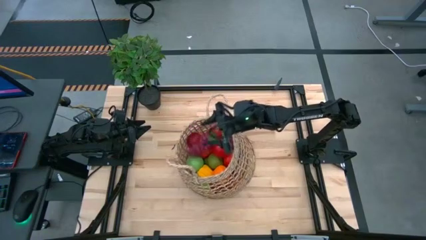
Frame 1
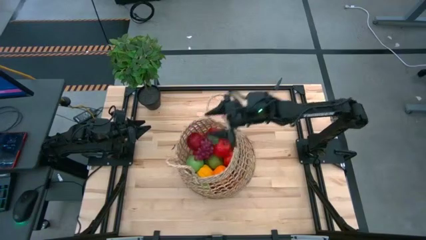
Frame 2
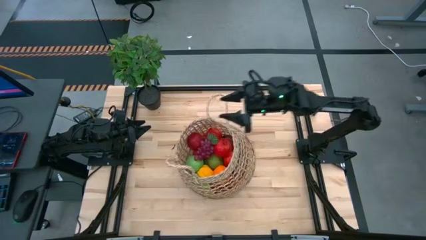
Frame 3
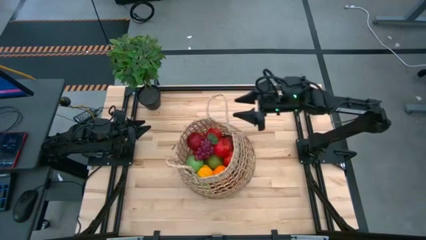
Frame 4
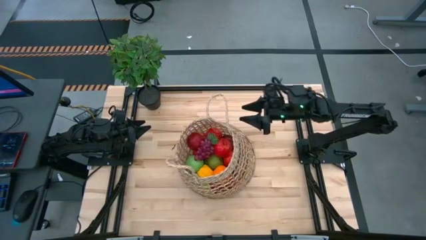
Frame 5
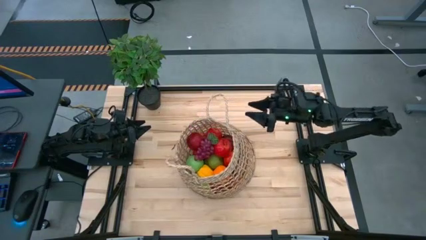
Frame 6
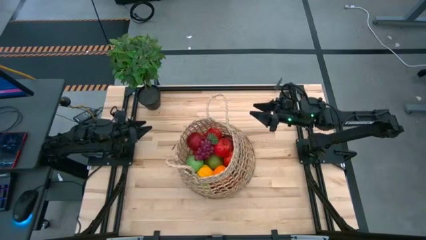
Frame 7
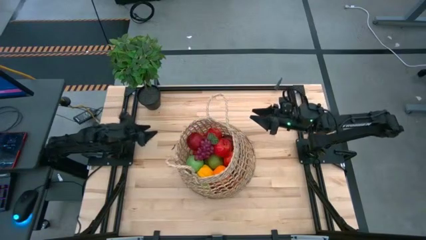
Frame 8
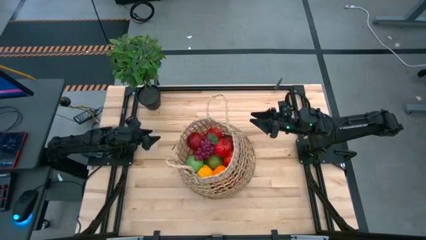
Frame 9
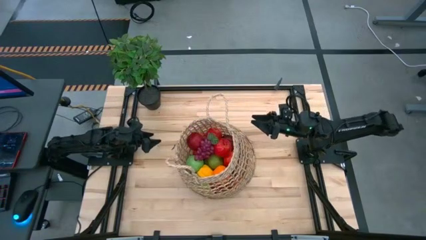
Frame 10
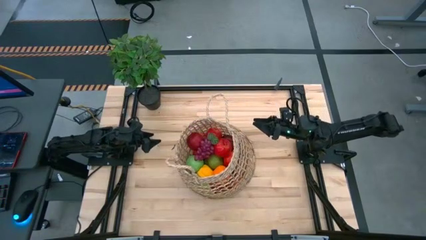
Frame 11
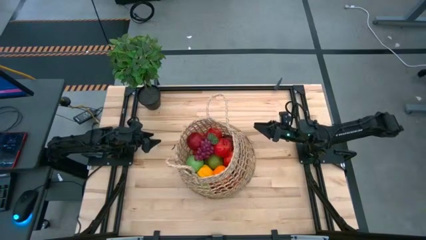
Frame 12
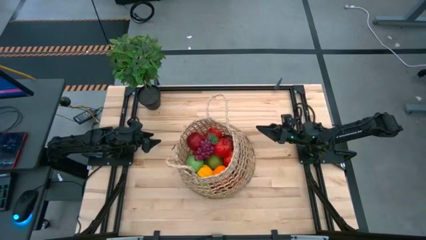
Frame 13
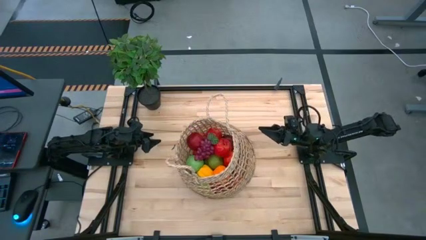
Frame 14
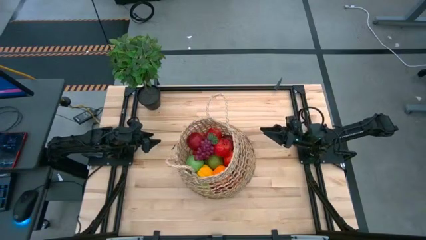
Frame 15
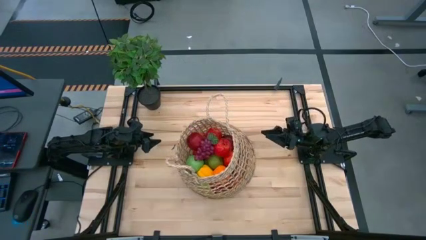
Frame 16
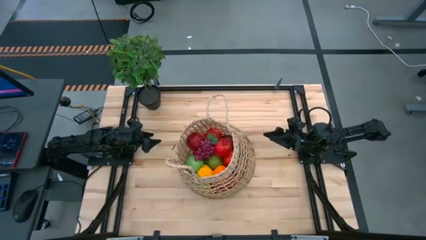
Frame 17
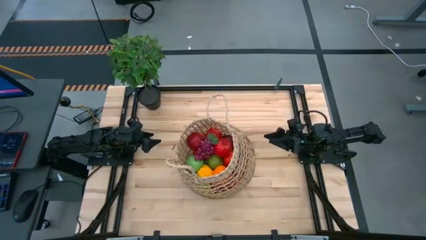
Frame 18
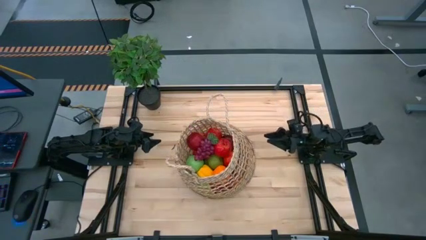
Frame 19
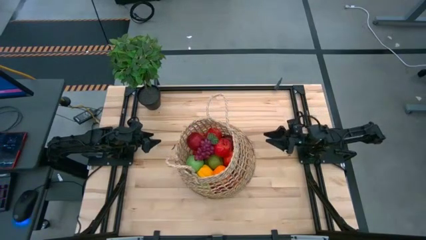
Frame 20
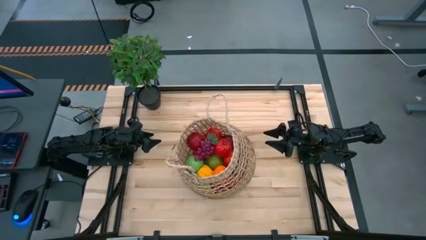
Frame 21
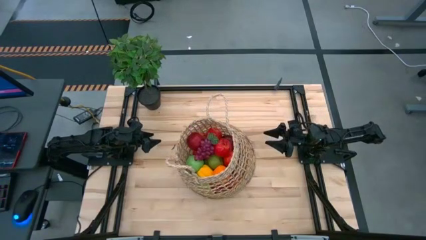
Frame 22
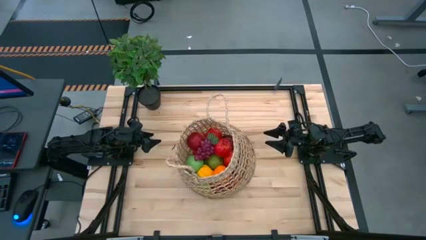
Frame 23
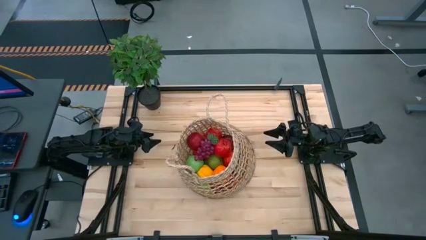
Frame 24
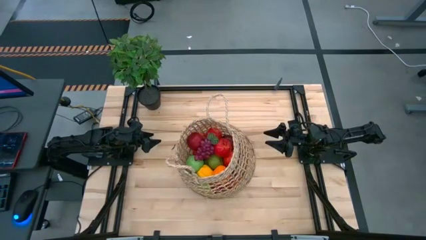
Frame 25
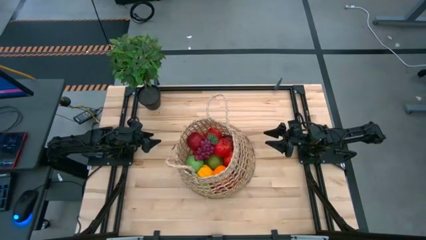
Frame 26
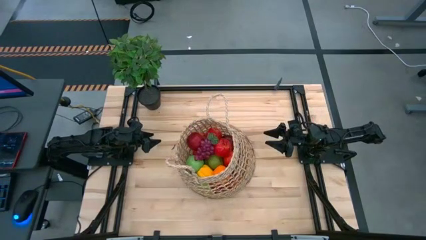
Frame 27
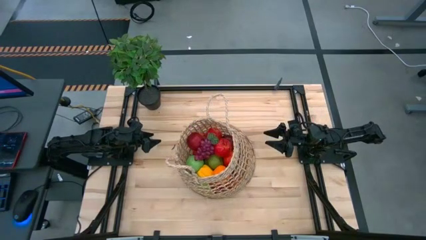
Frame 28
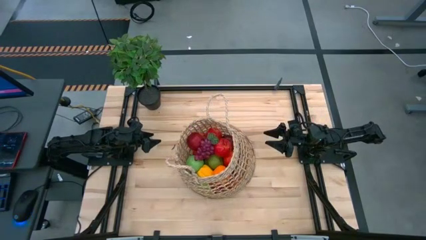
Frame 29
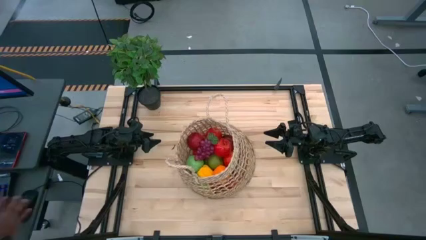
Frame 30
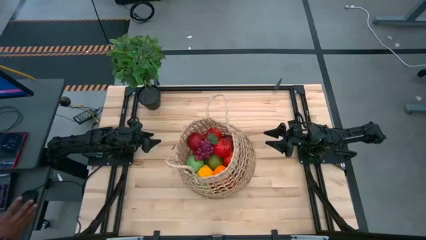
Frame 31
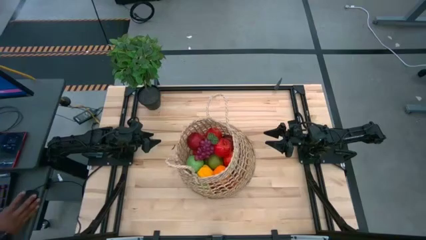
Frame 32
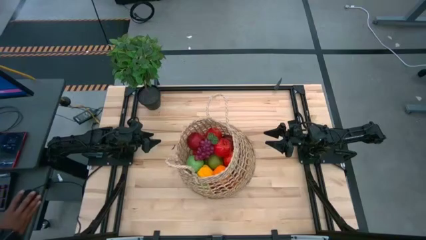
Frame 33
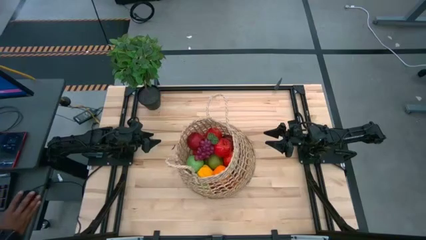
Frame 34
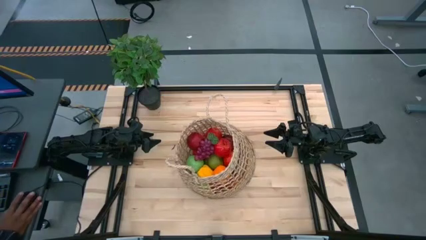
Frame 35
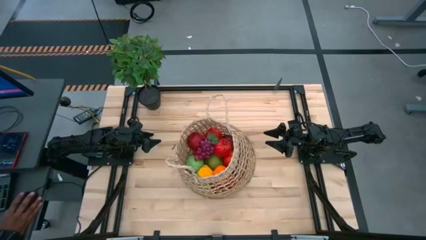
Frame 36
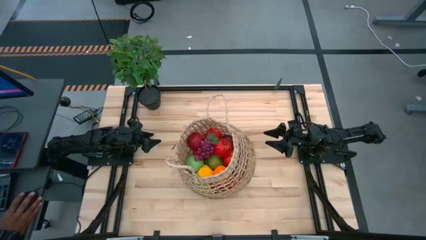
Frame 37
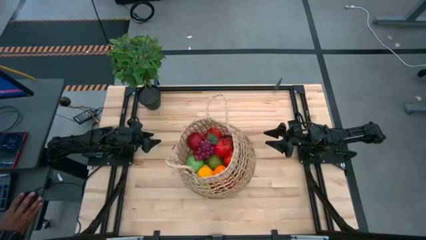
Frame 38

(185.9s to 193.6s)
Task: Build produce basket
Return to Home Position

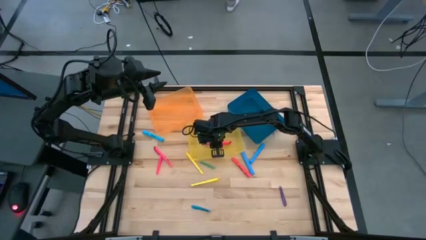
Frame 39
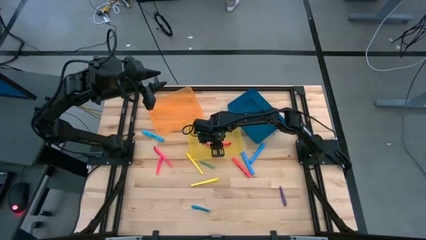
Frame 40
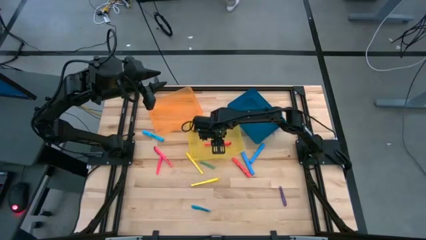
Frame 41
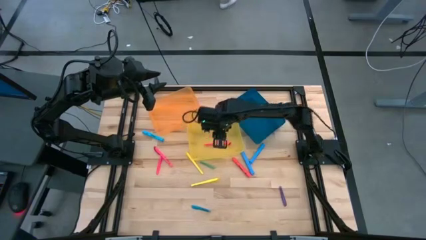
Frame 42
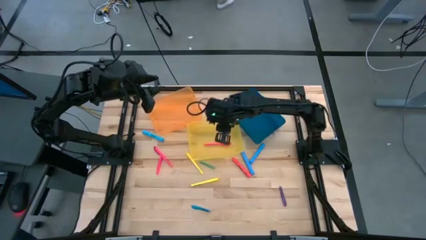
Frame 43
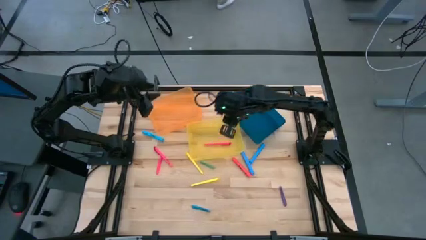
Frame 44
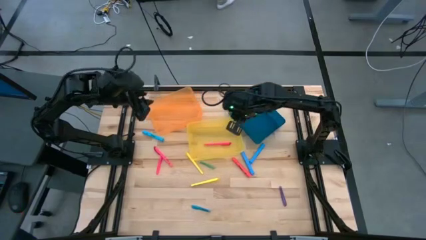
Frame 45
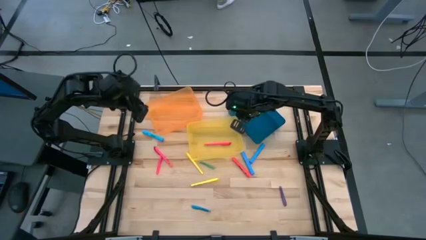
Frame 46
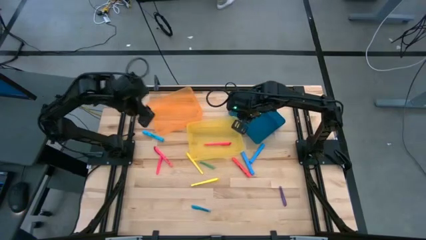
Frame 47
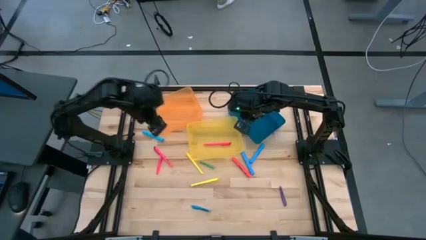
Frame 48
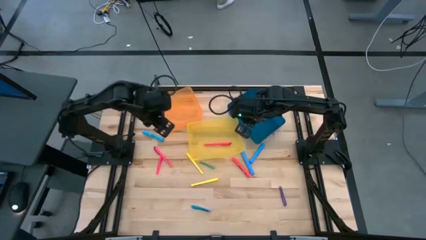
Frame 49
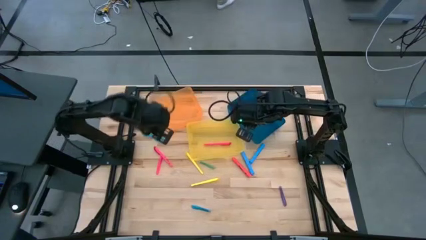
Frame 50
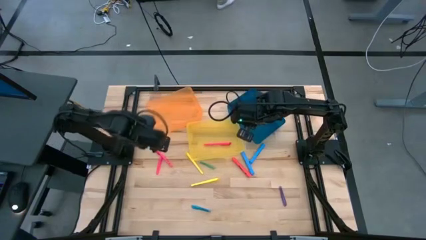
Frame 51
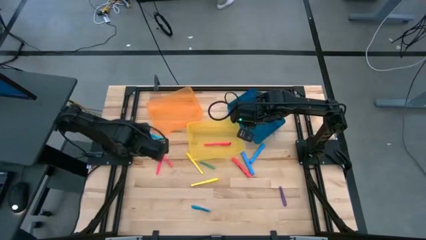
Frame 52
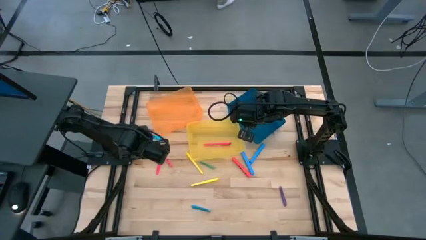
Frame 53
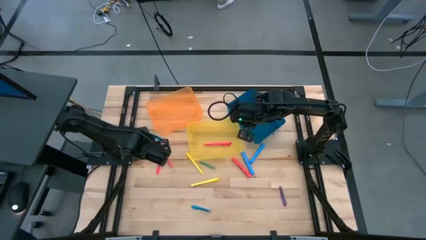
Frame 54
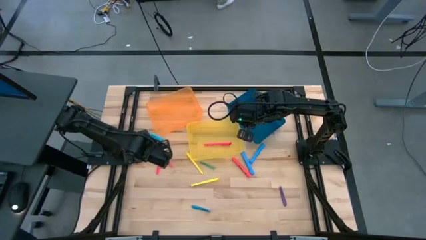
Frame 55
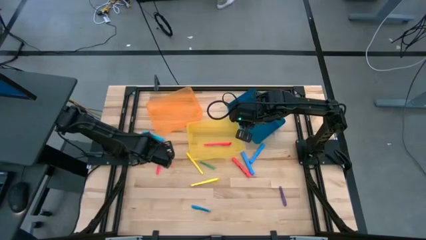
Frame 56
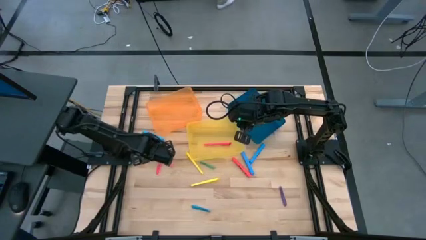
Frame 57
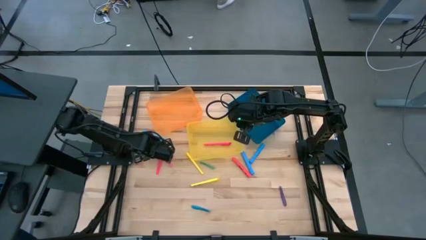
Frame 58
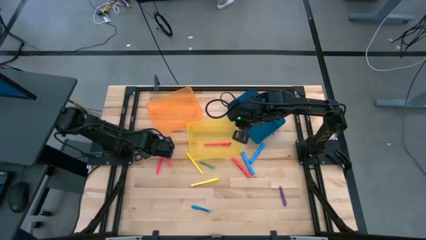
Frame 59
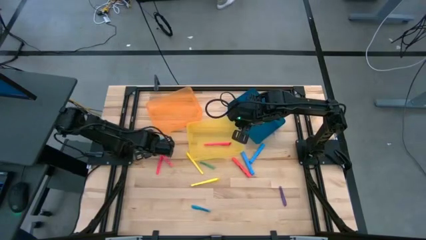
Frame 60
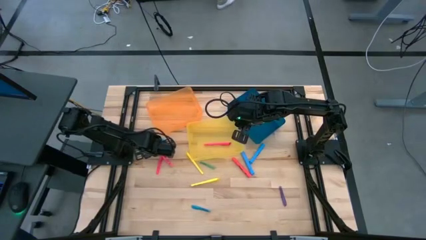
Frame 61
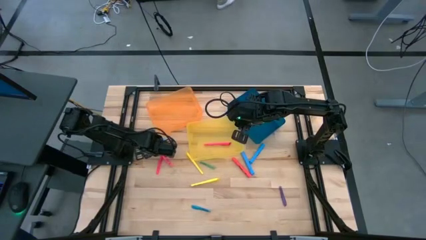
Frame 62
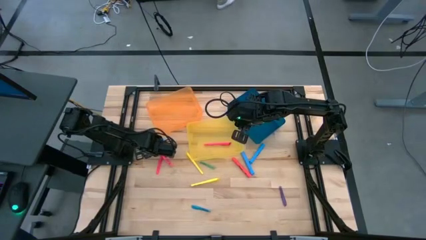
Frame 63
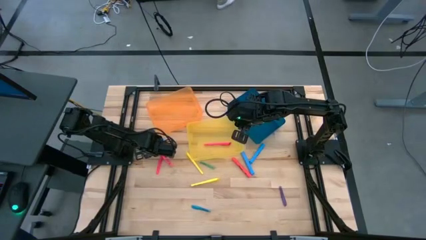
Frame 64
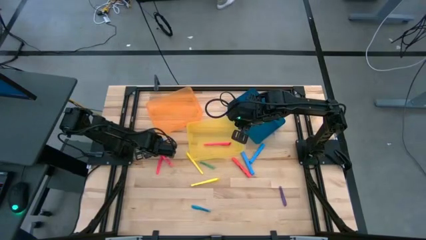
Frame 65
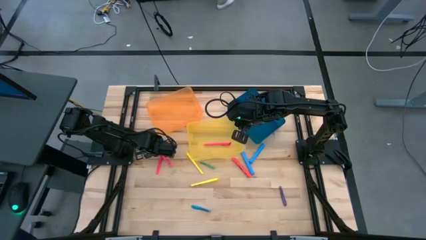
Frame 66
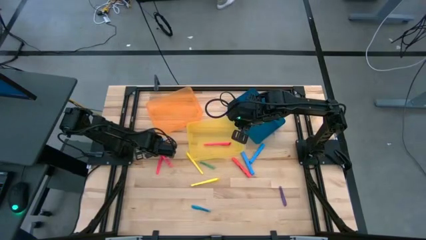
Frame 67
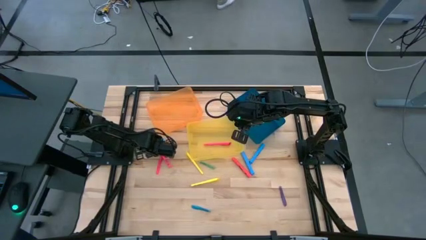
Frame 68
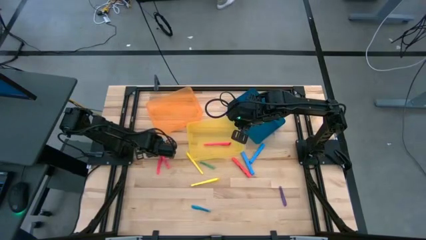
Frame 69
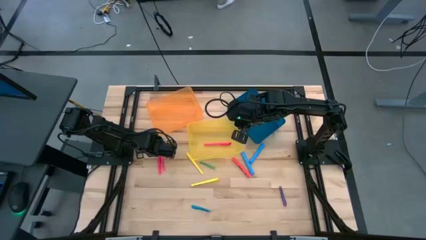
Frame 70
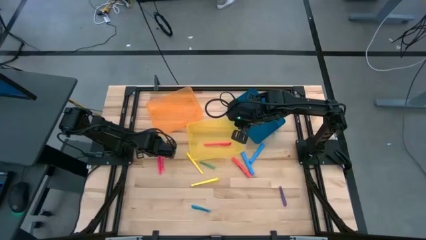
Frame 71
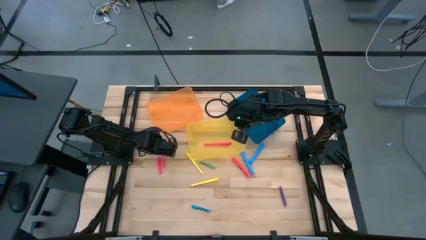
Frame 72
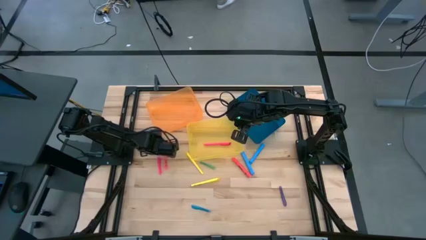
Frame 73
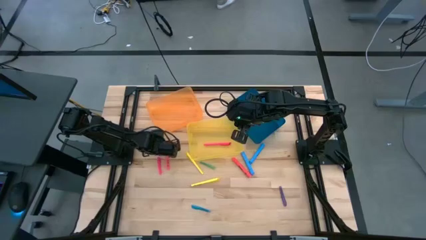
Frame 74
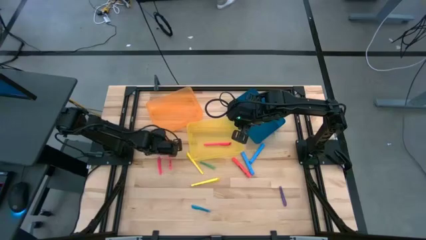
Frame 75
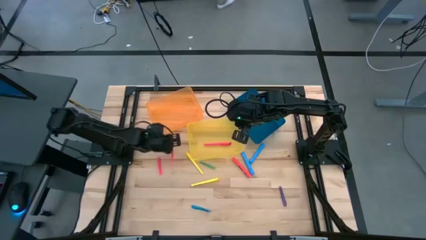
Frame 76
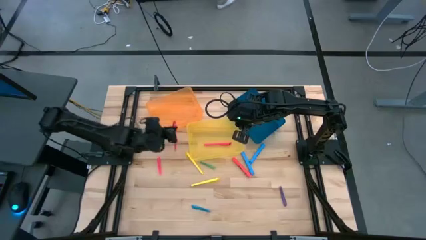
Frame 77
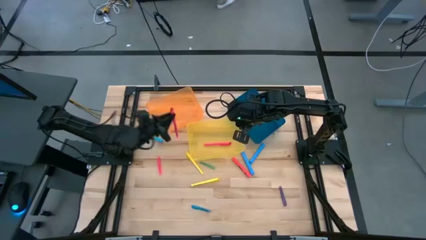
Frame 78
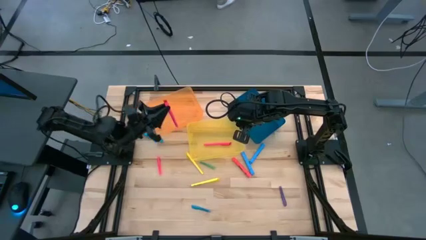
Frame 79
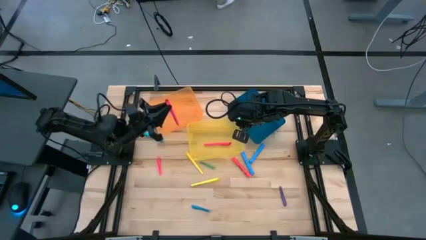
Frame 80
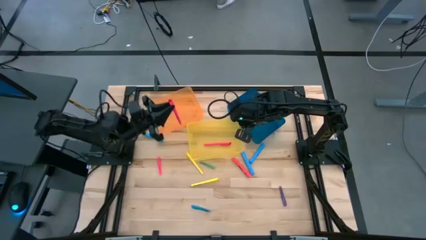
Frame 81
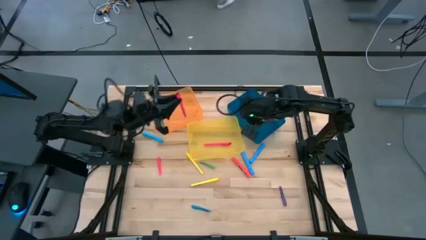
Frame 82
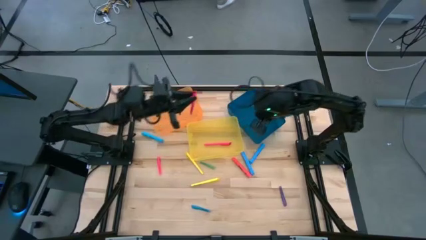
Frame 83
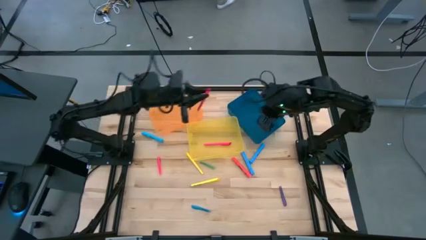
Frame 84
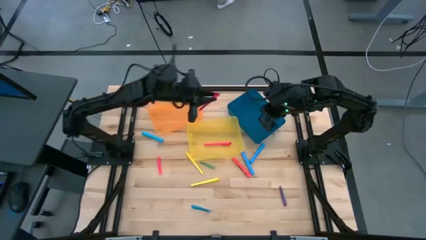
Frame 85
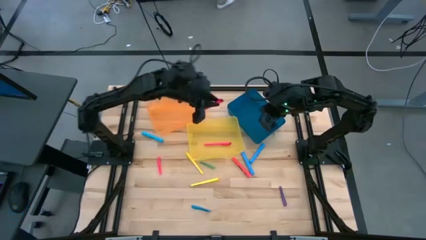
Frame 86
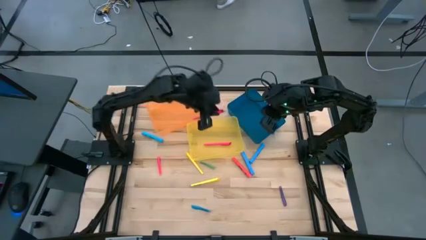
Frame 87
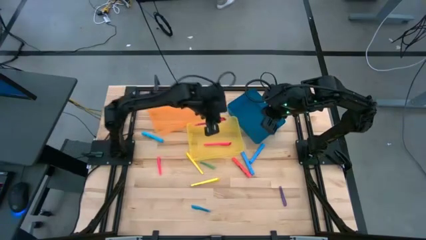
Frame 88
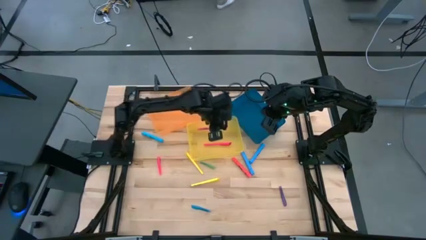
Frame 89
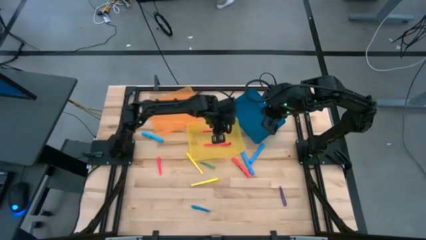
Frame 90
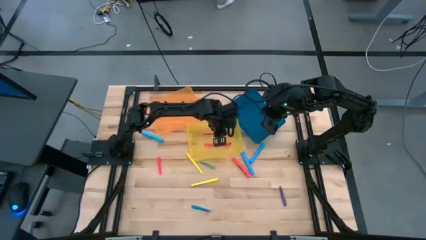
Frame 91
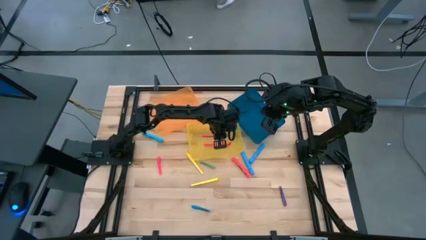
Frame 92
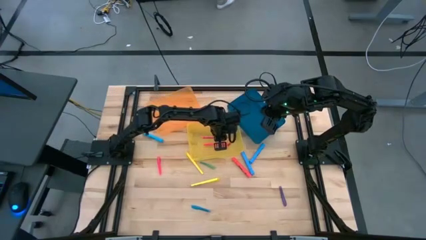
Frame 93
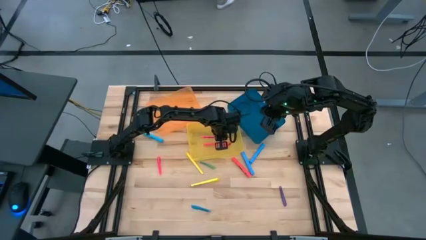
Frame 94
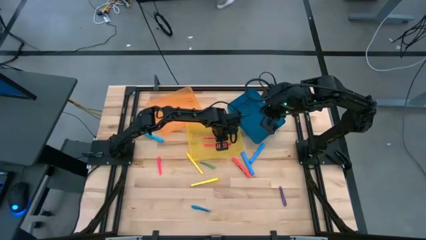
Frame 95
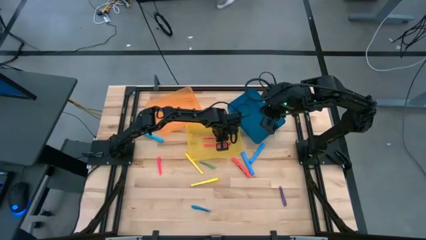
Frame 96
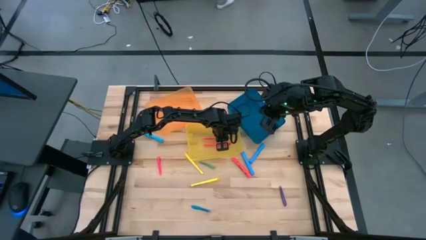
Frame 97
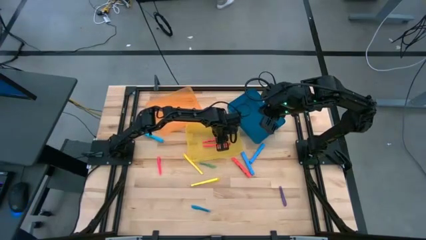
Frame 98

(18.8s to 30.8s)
Task: Pick & Place Markers
Put the medium pink highlighter pen into the yellow bin
